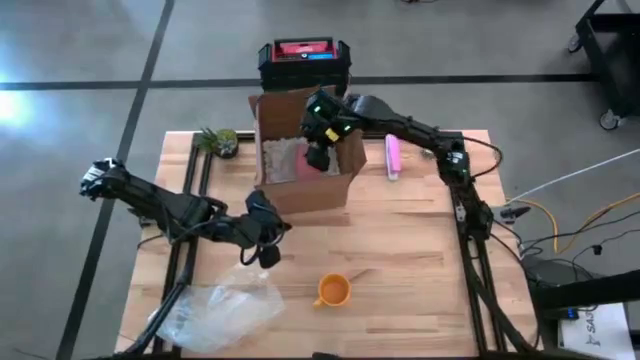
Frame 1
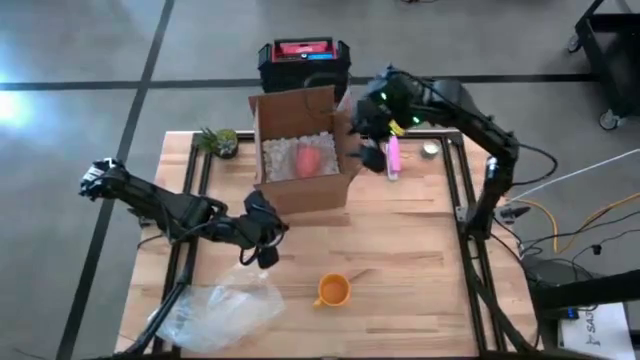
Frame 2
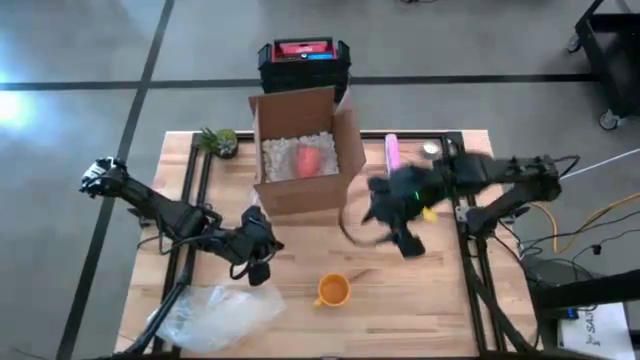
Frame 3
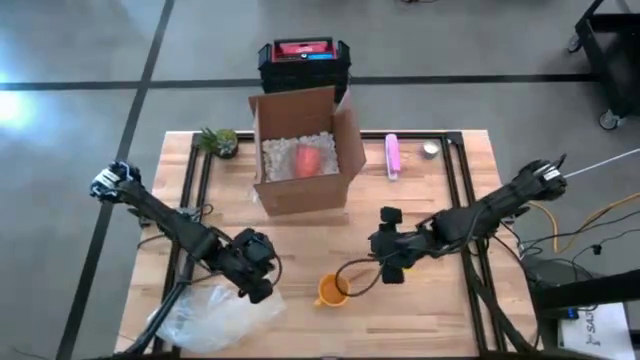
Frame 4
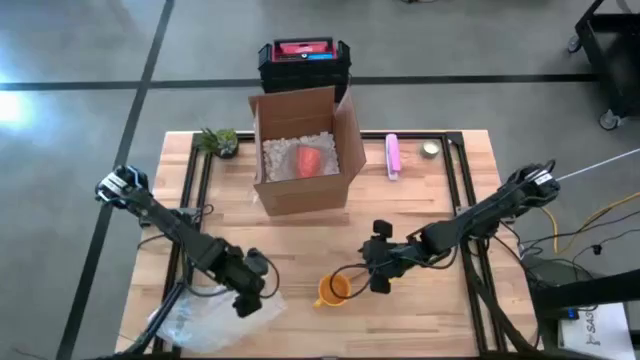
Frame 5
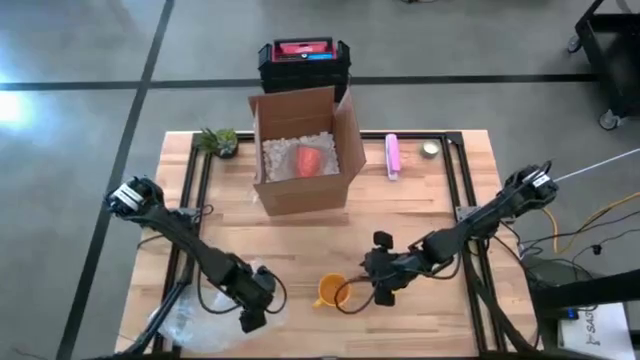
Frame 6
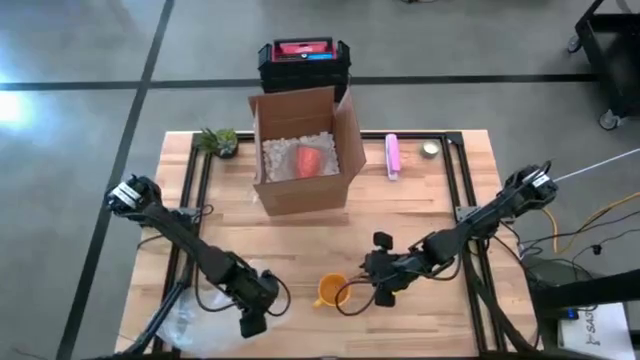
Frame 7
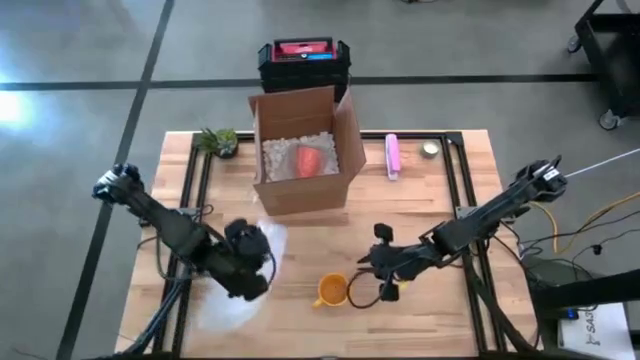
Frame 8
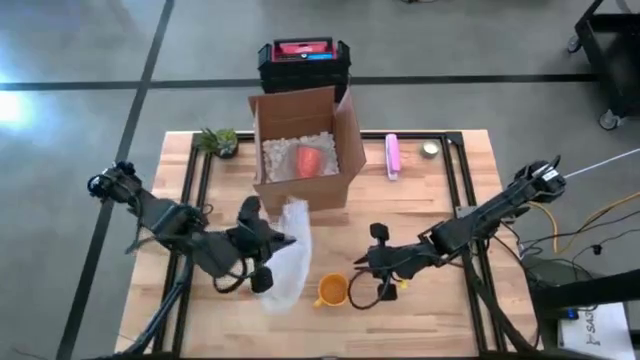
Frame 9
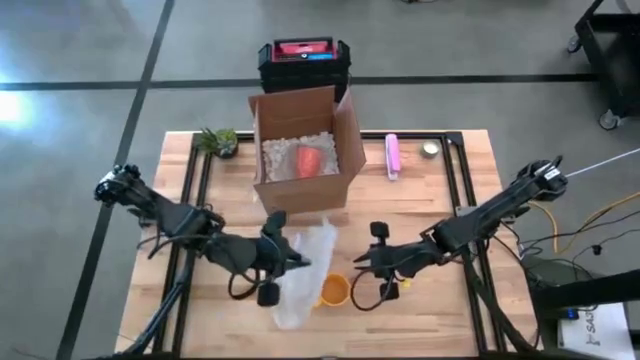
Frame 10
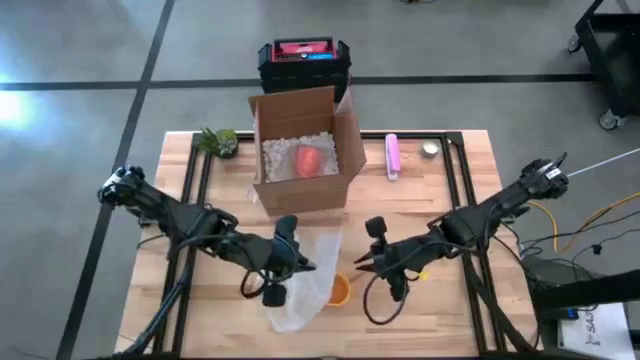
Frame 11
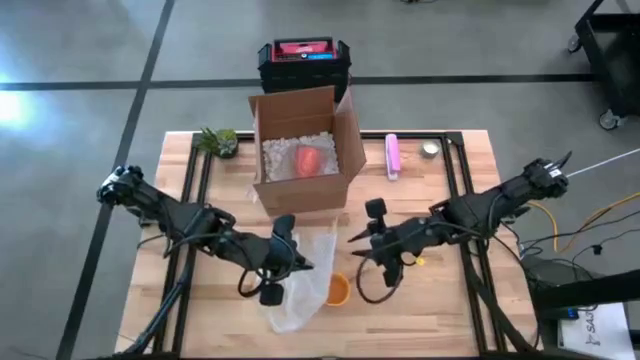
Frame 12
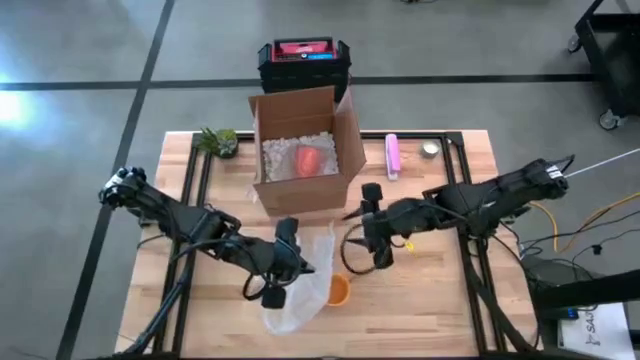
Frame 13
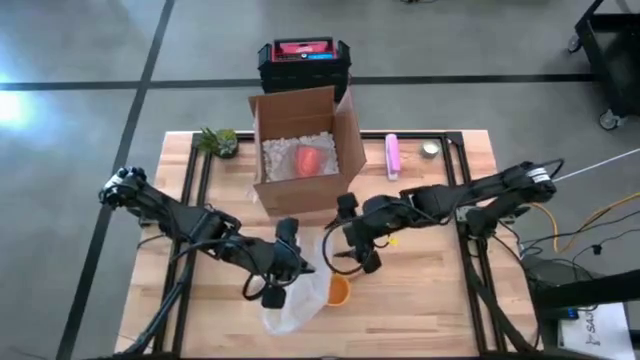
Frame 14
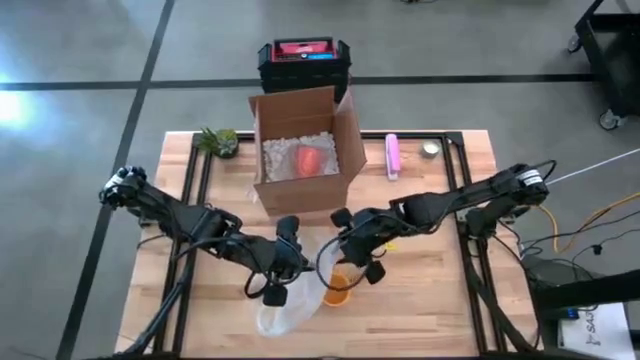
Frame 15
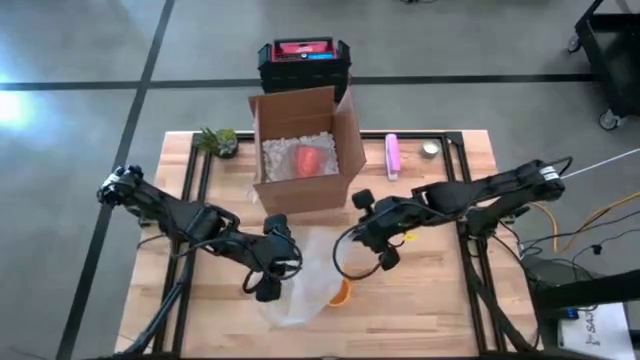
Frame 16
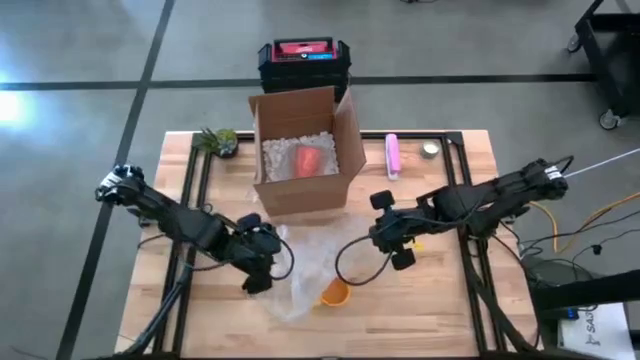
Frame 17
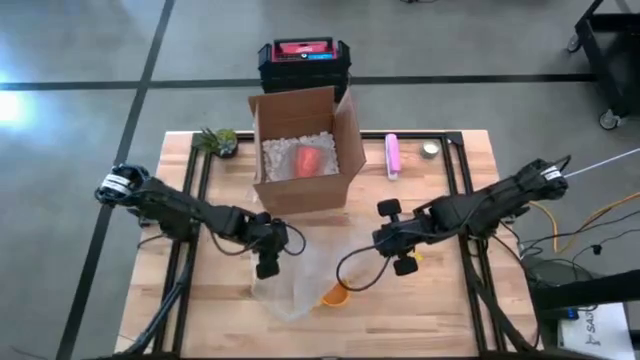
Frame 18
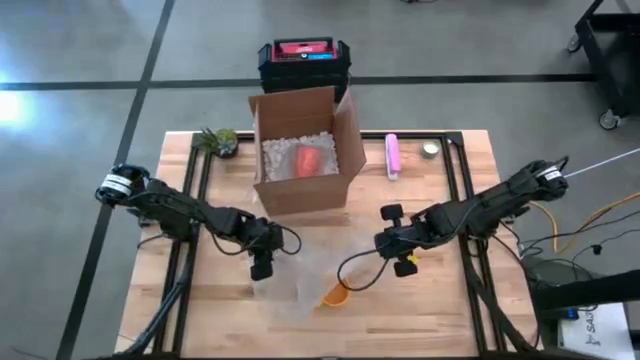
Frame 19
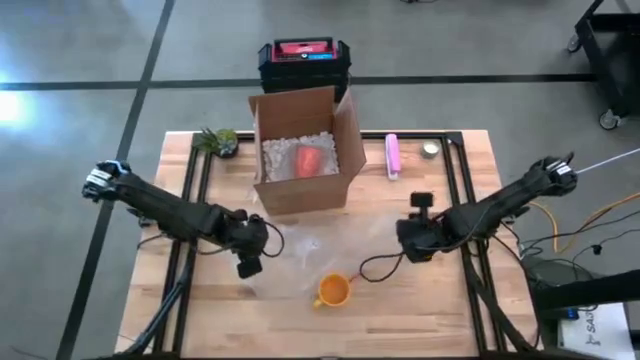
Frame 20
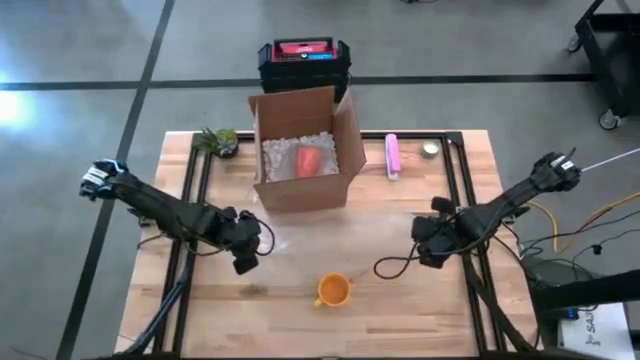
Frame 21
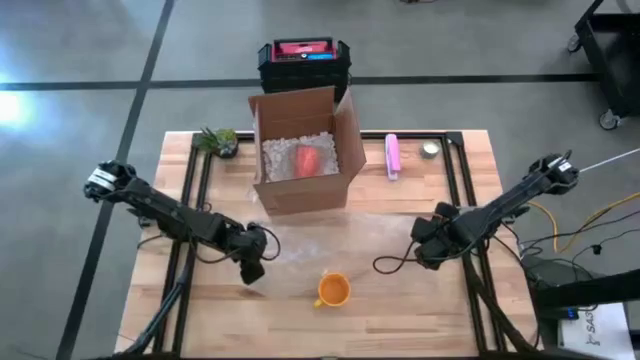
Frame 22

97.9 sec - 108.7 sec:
Task: wrap mug
Prepare the transparent bubble wrap

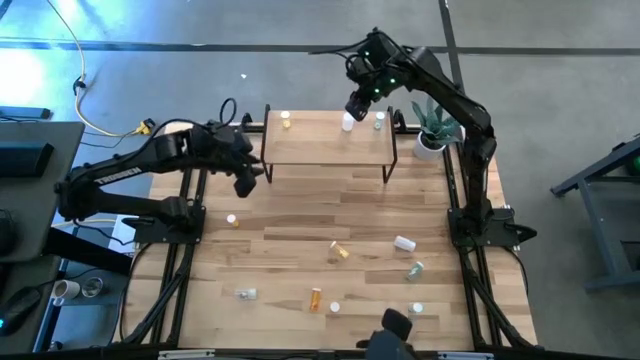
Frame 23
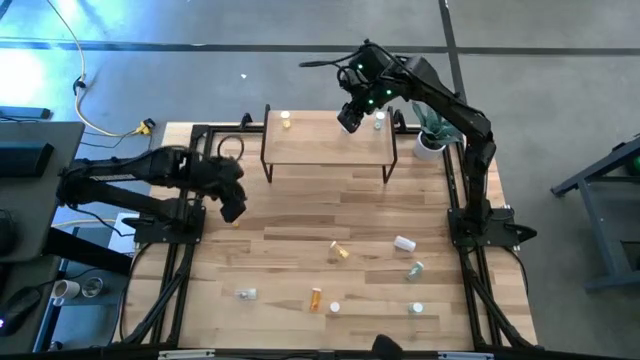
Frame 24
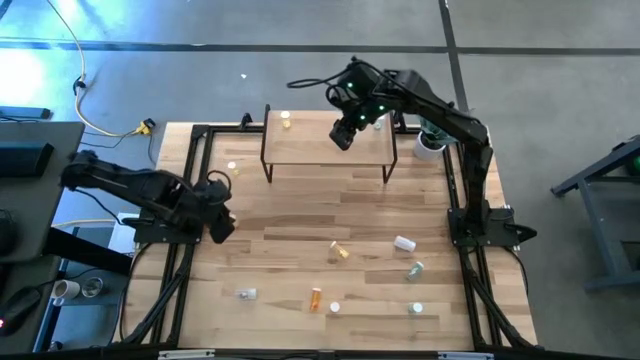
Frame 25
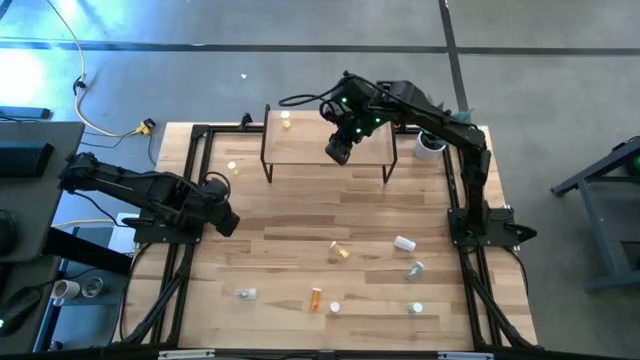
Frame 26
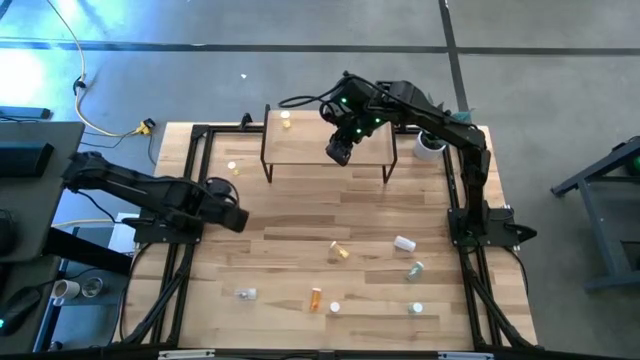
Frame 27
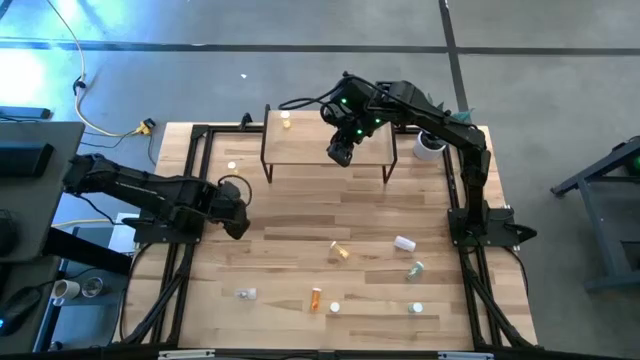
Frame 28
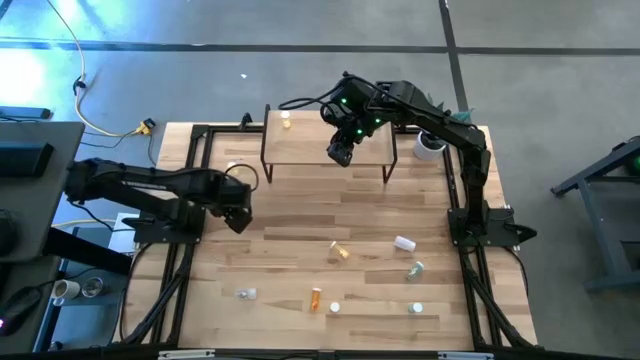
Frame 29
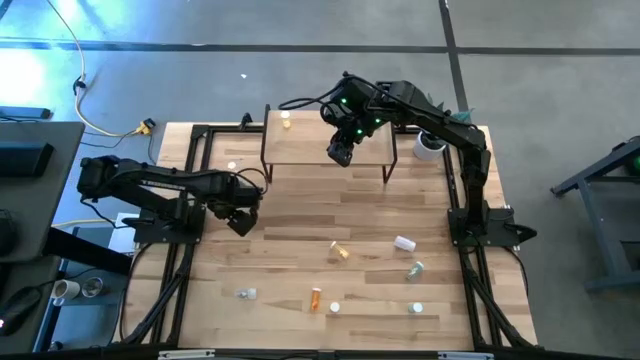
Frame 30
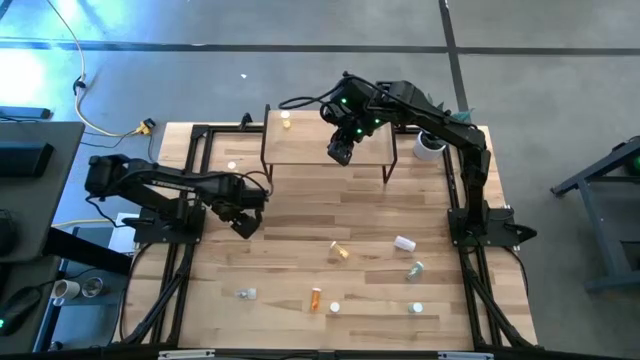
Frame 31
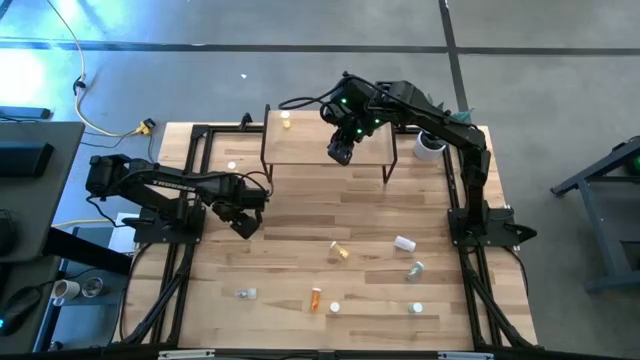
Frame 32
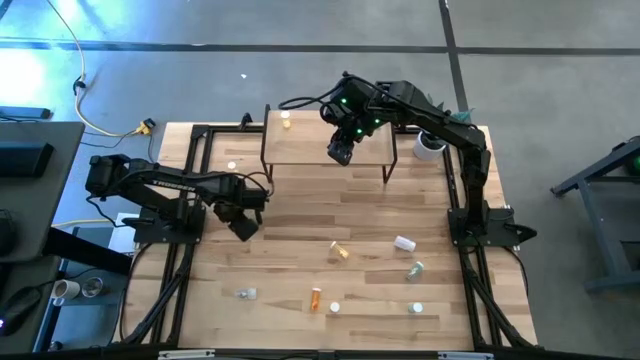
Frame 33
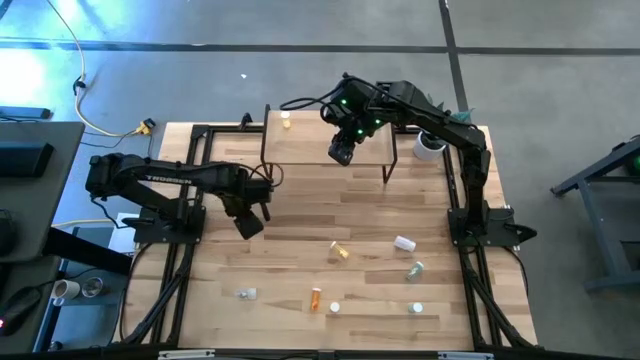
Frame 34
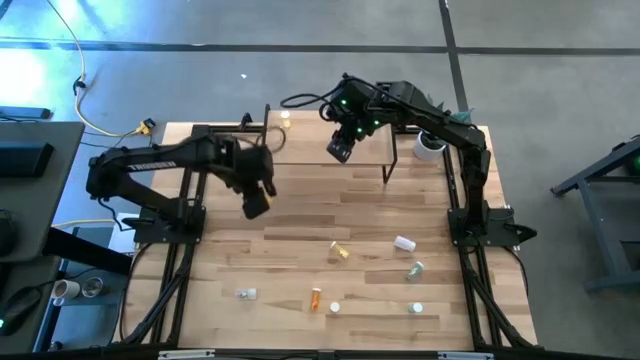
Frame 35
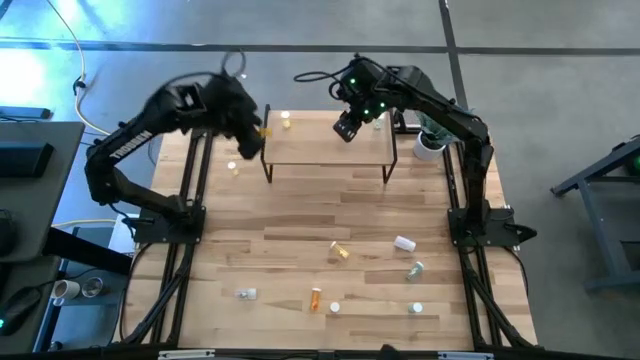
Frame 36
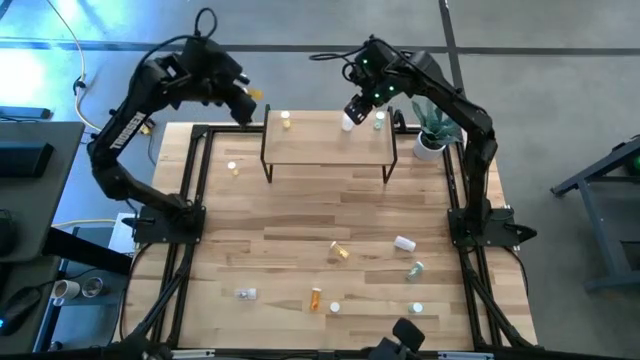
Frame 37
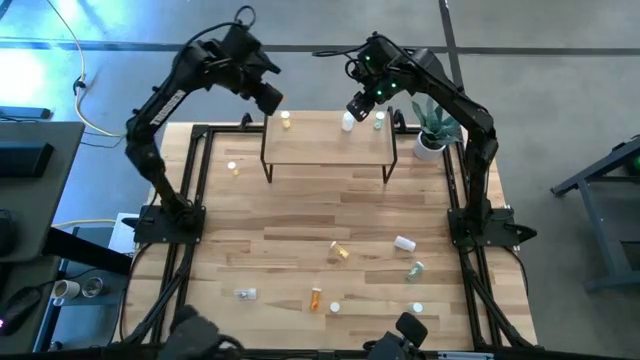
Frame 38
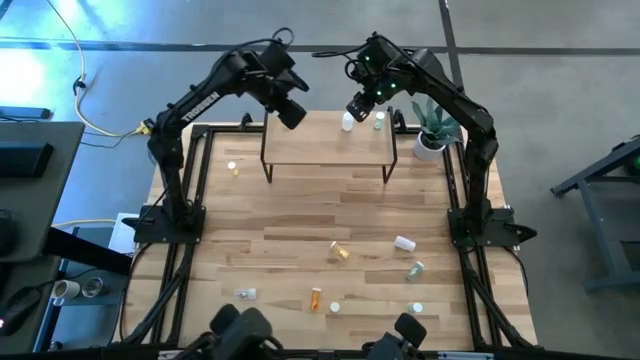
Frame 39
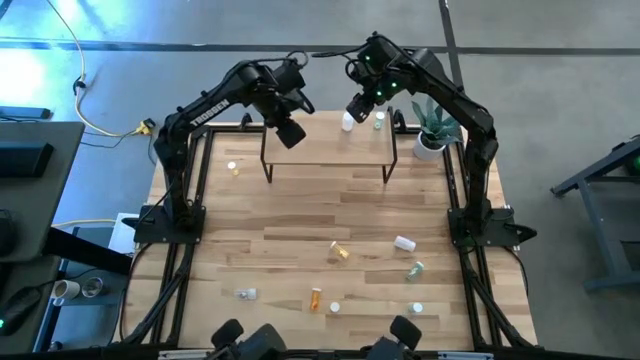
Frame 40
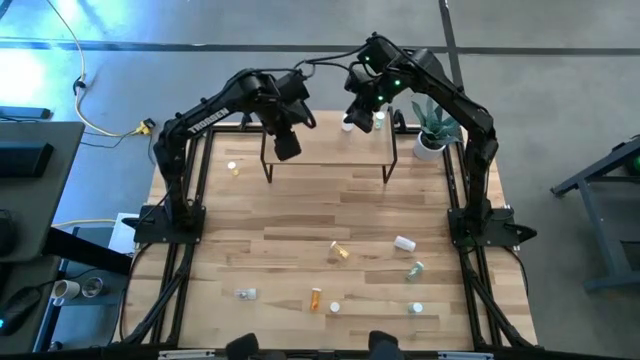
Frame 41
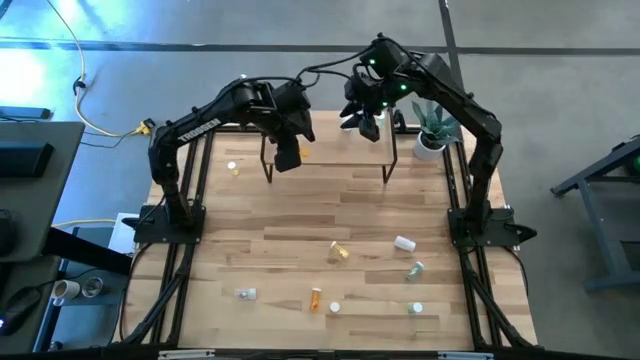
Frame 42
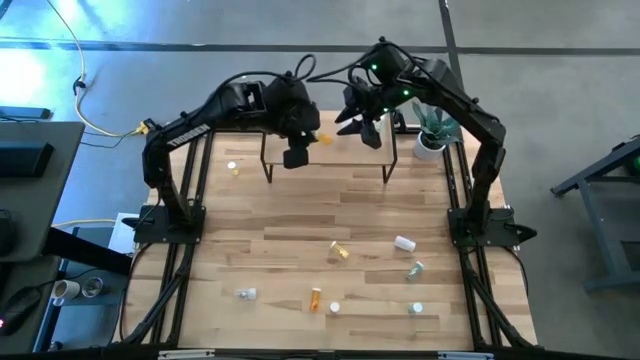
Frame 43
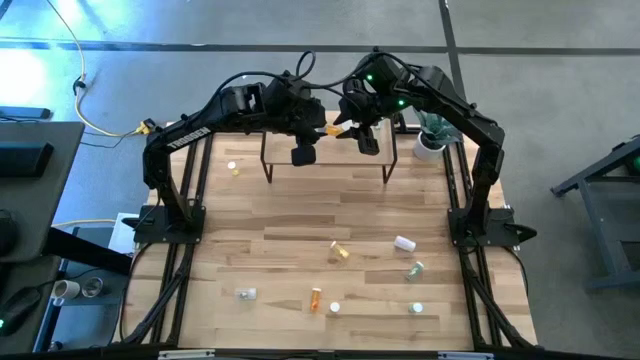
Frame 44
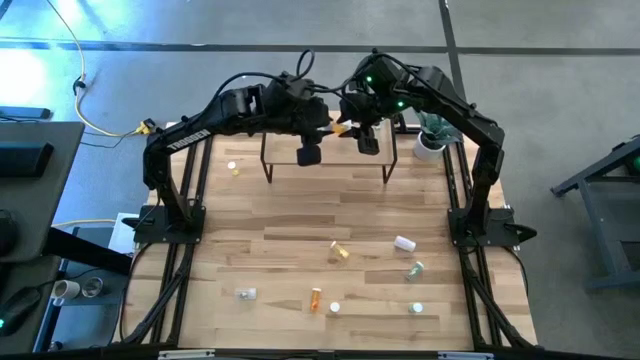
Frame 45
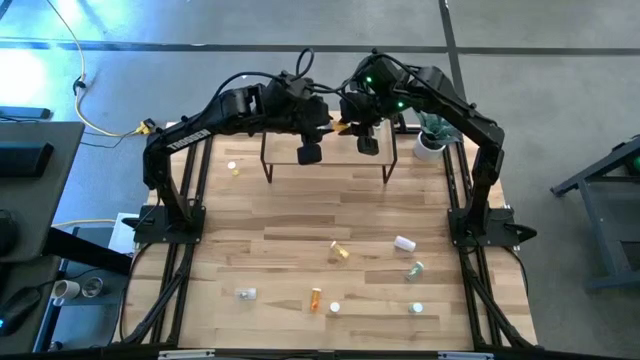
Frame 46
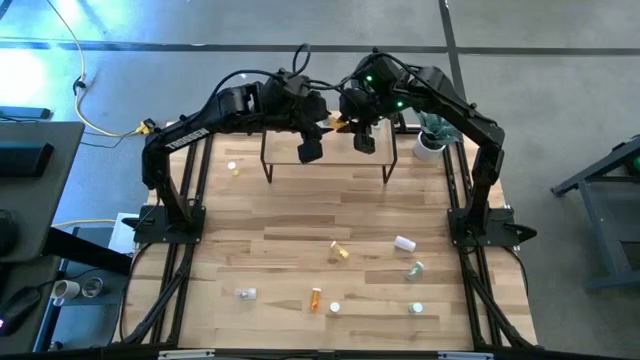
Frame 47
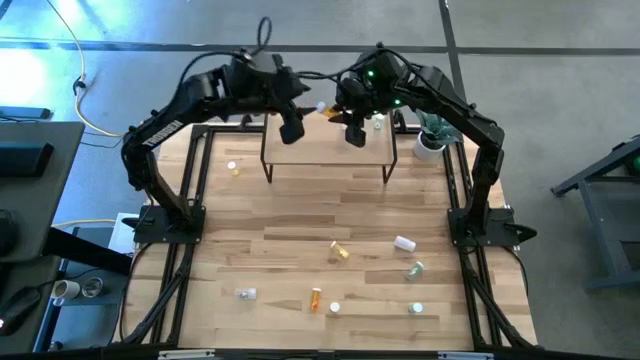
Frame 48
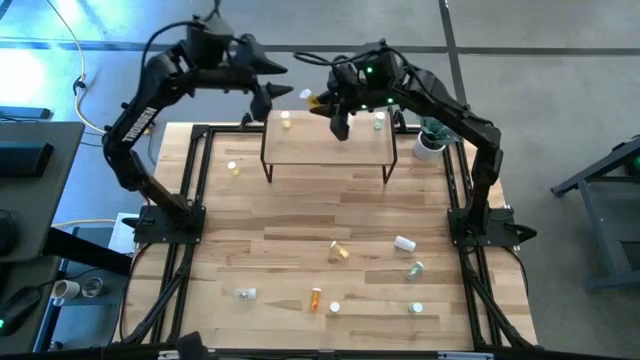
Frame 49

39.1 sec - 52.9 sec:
Task: Pick and place medicine bottles onto shelf by color
Put the top left orange pill bottle on the shelf
